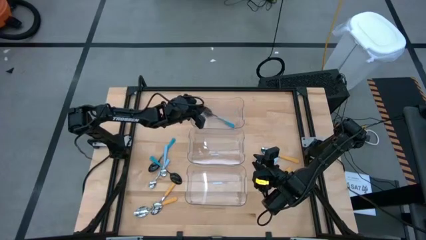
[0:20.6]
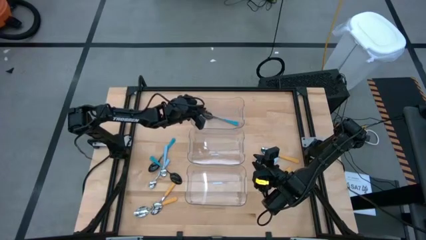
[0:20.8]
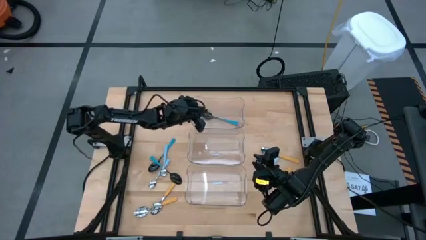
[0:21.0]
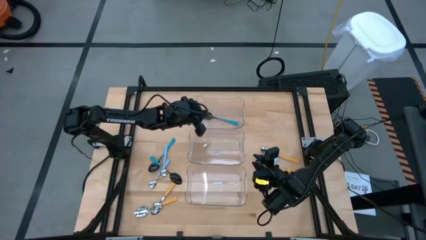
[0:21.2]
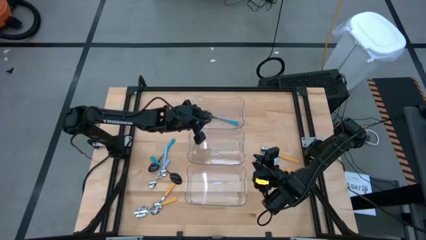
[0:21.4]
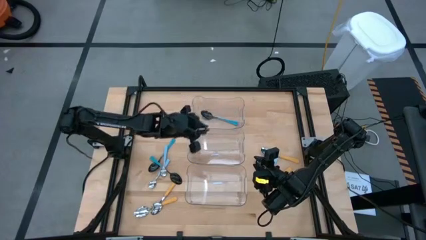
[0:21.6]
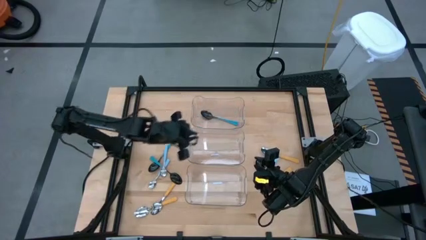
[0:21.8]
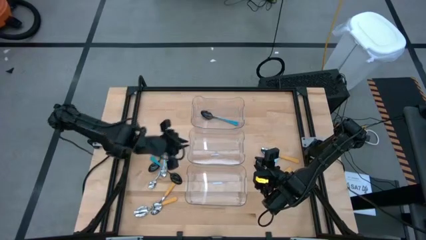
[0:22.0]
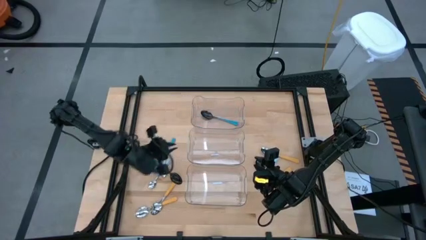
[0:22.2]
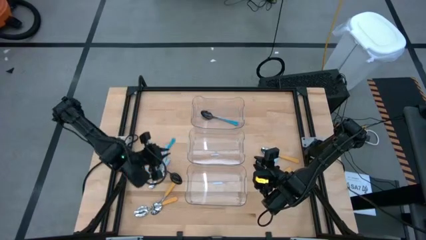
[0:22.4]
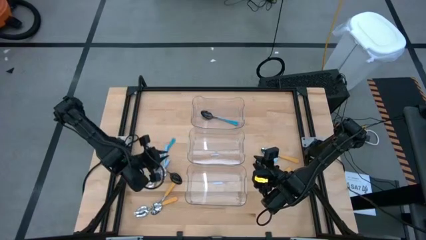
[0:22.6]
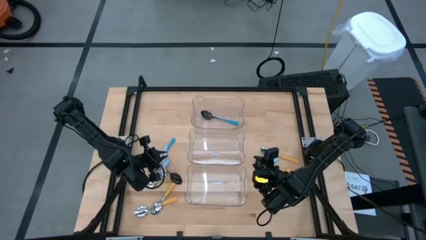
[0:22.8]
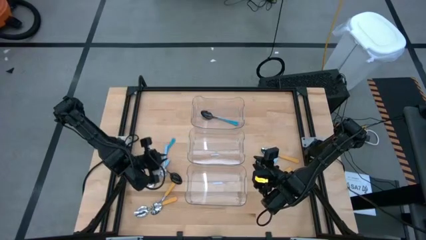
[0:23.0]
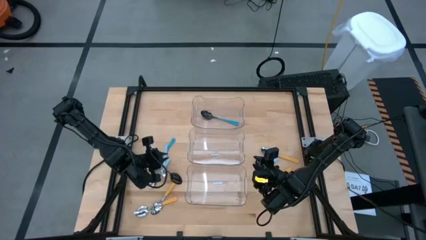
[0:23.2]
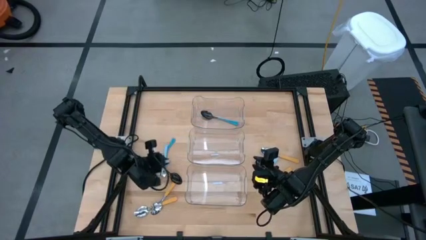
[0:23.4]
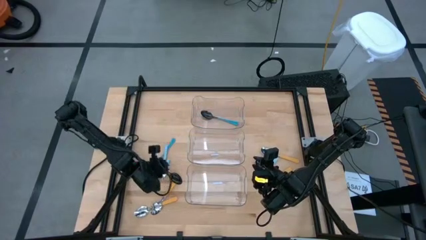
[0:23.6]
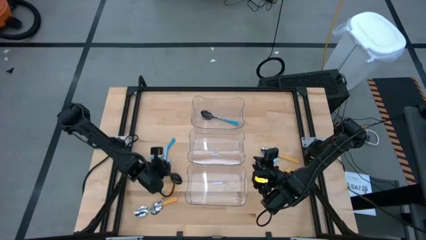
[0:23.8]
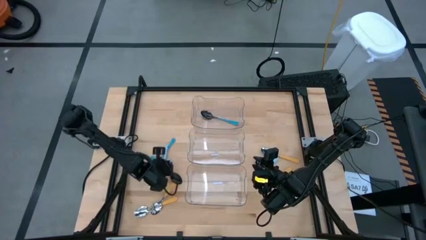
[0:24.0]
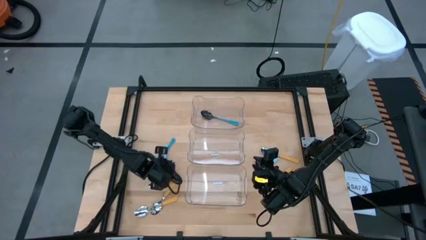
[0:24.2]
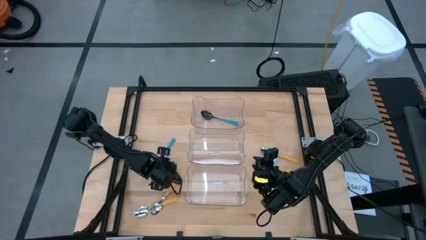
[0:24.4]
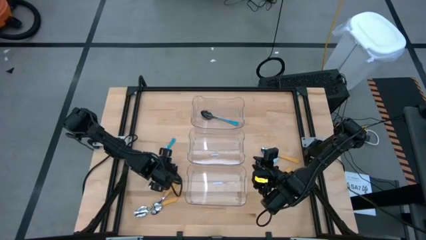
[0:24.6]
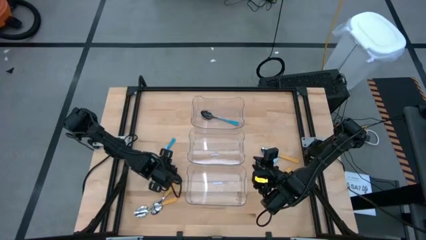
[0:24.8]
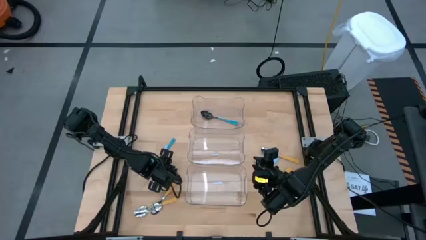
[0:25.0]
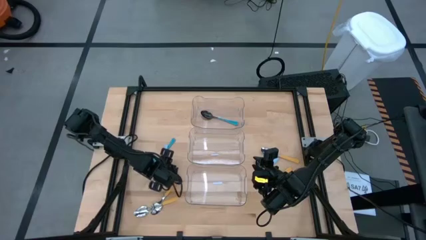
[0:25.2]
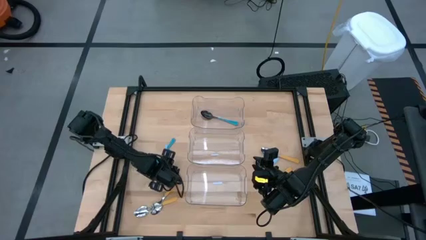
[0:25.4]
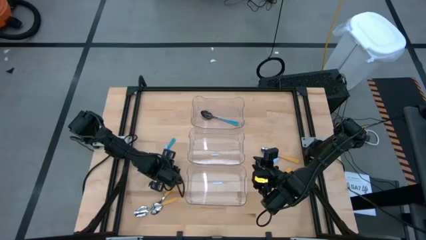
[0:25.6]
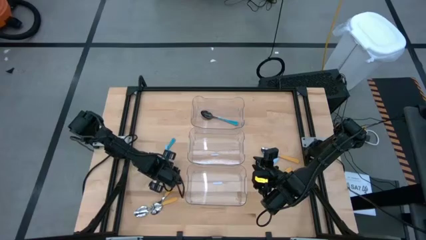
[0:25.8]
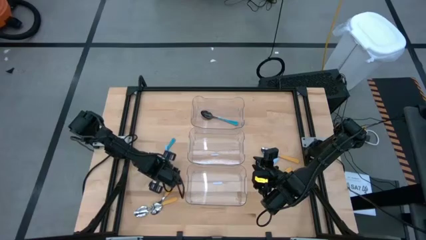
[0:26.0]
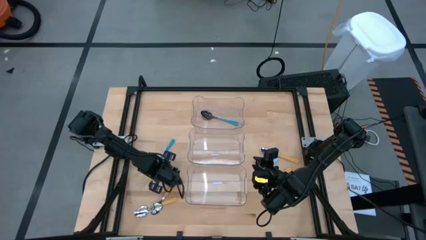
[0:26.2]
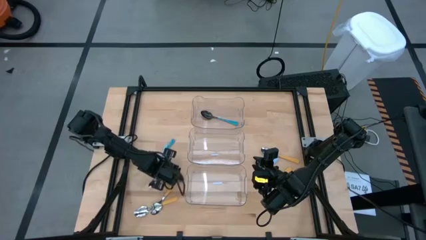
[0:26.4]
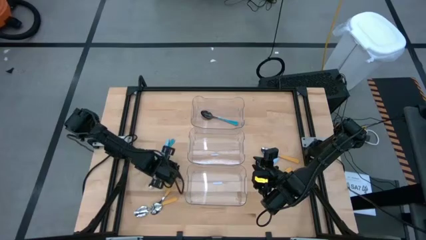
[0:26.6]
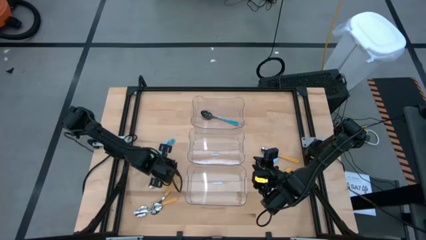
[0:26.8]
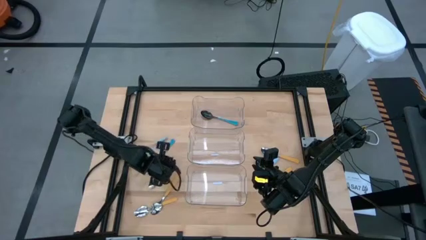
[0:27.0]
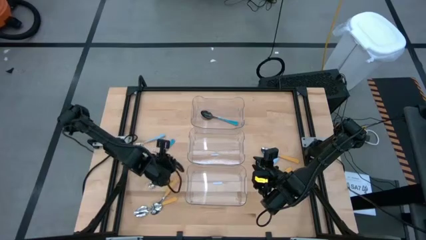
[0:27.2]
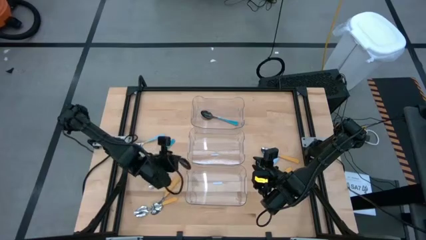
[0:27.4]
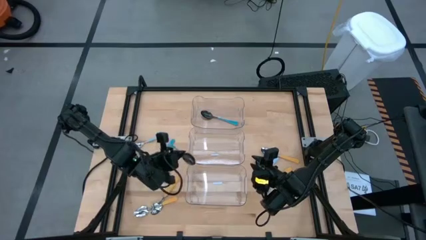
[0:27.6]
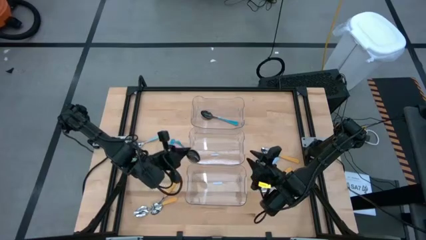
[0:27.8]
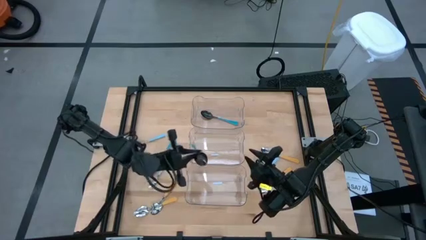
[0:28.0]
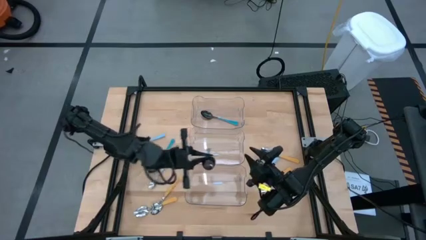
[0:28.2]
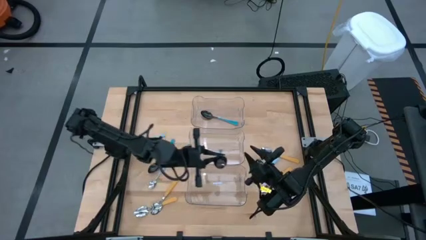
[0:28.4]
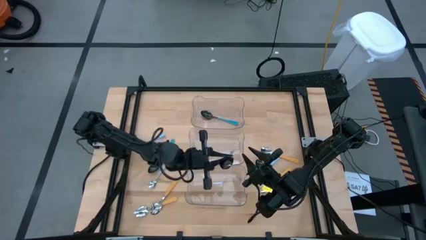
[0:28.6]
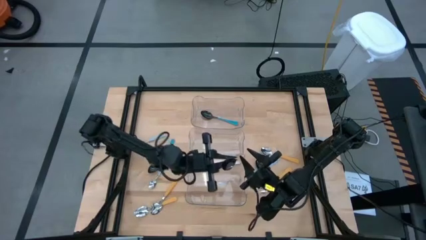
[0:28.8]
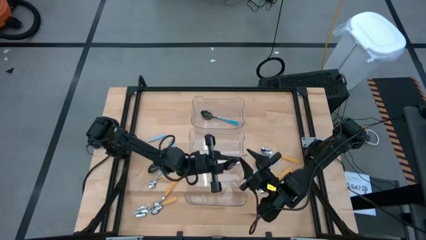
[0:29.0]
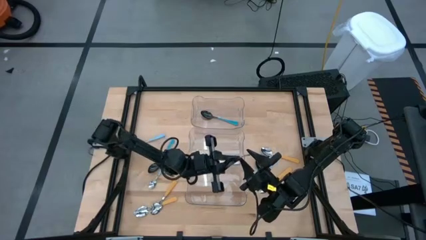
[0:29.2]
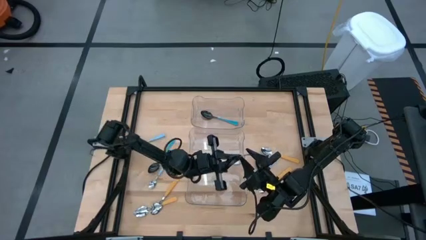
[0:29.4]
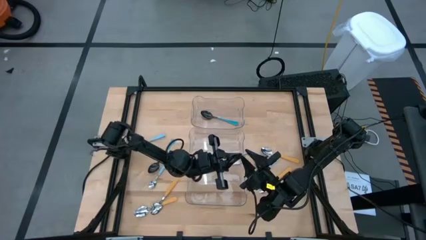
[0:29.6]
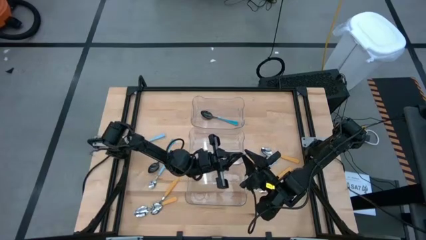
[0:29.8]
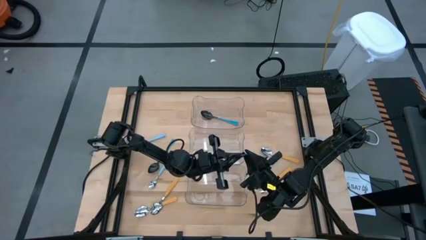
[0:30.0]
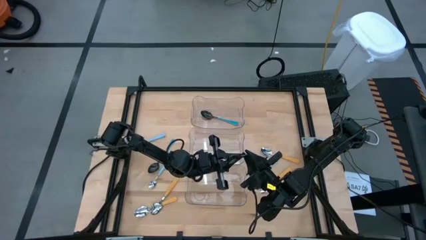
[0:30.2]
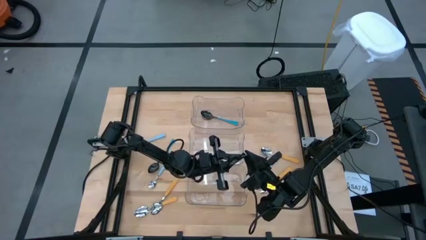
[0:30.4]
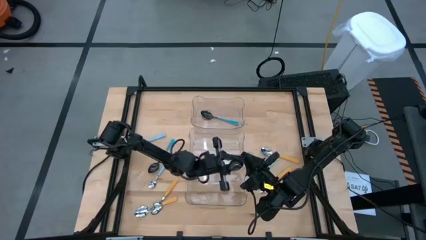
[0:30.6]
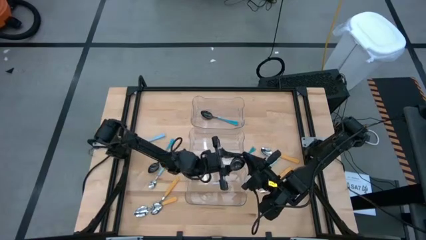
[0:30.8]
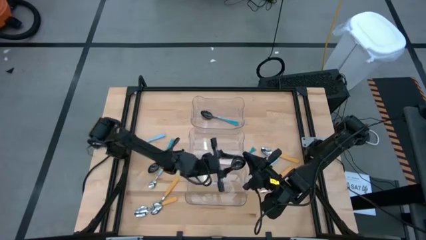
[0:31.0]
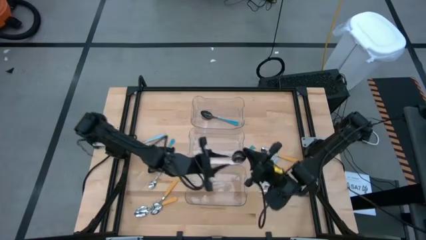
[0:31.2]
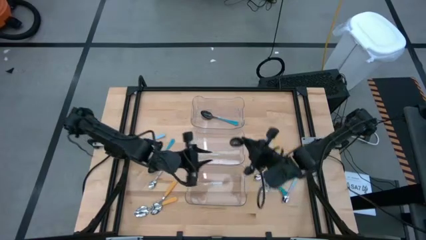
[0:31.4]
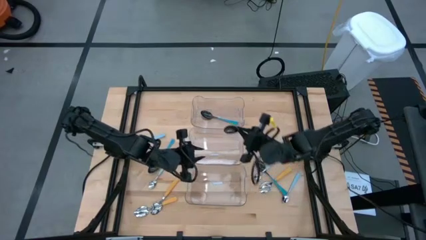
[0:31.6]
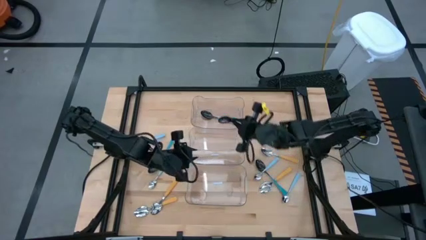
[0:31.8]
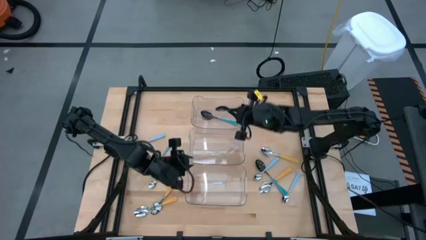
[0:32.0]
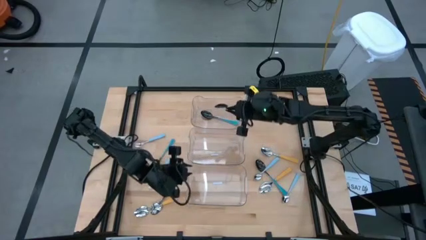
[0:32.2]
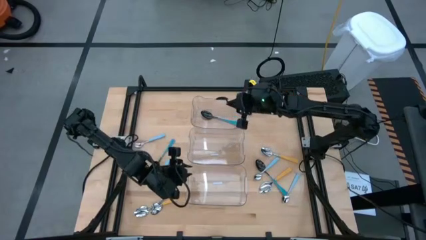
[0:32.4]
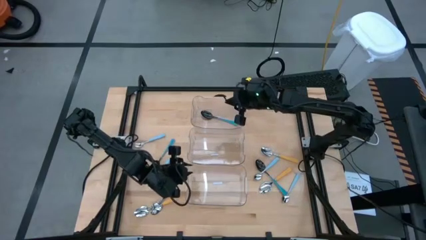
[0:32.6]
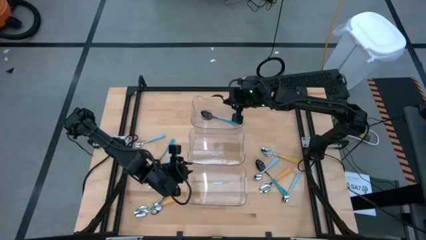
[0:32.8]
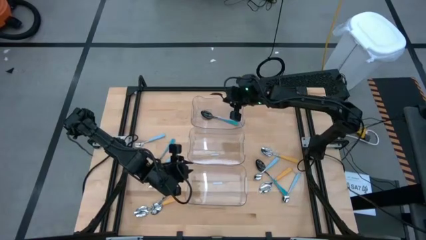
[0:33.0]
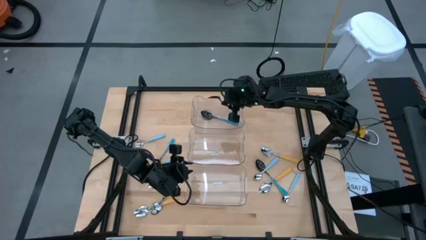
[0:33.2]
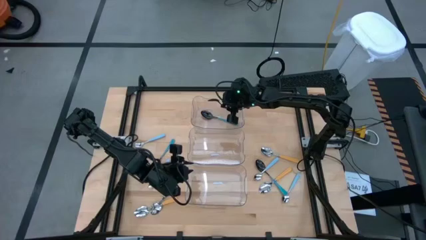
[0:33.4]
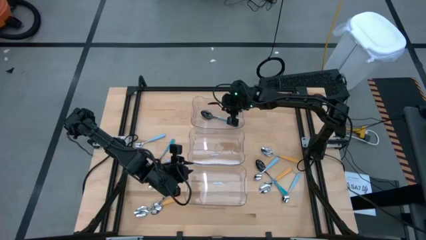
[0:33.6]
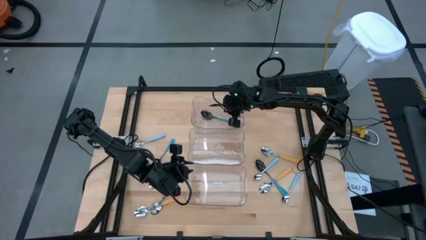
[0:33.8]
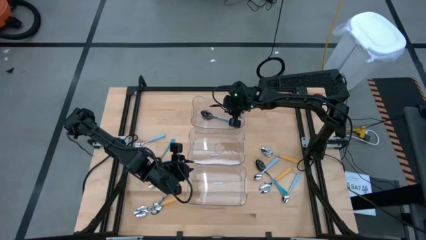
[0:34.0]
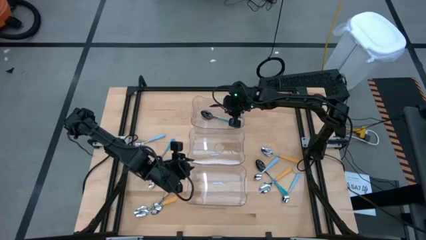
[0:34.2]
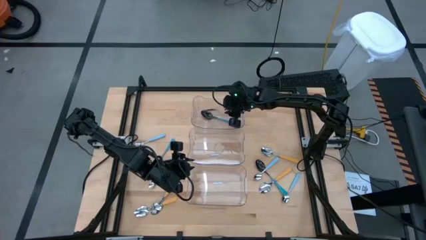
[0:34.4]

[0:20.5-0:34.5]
Task: Sort silverware by color (type)
Put the dark blue spoon into the top transparent bin
